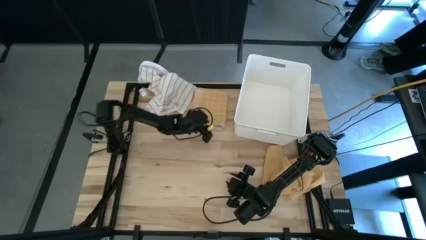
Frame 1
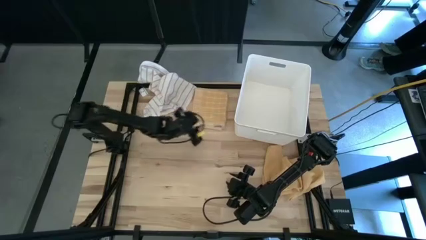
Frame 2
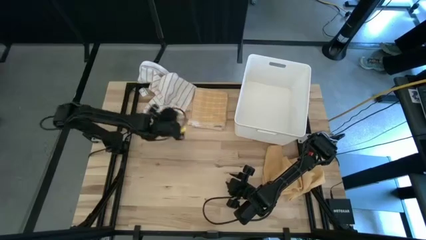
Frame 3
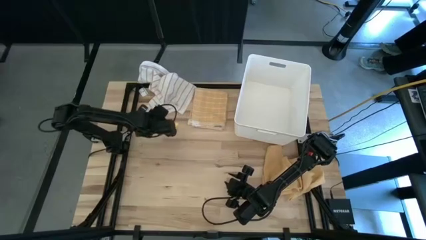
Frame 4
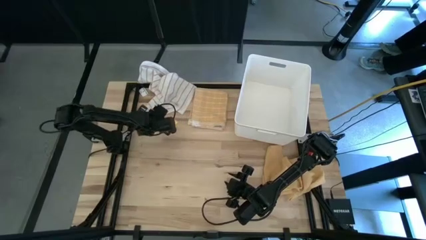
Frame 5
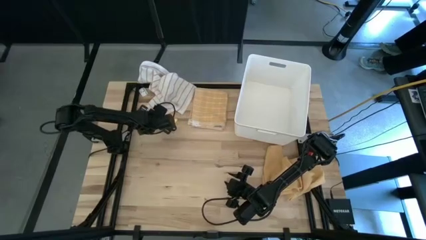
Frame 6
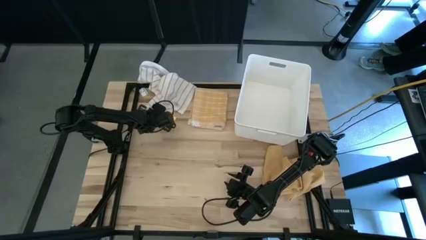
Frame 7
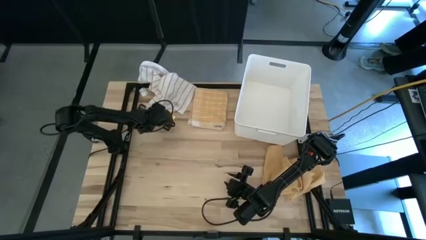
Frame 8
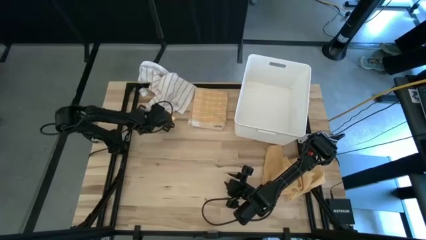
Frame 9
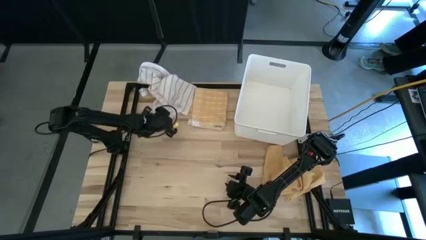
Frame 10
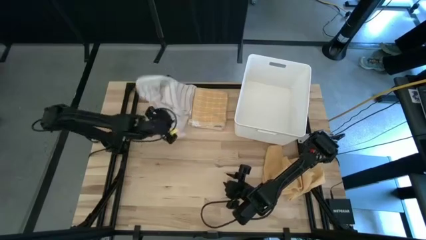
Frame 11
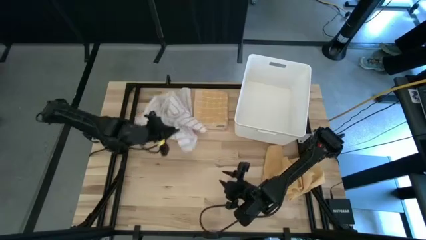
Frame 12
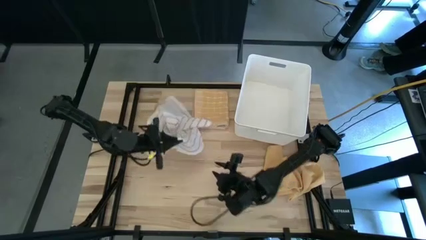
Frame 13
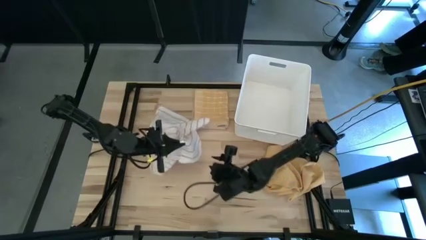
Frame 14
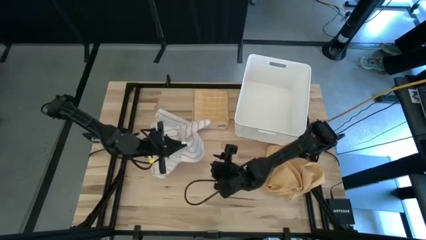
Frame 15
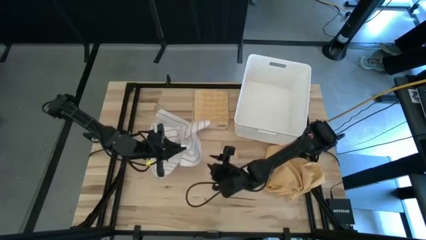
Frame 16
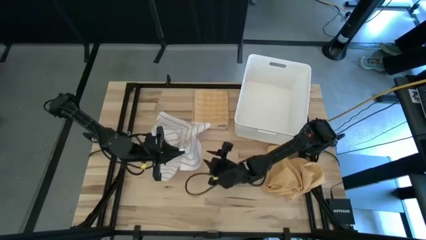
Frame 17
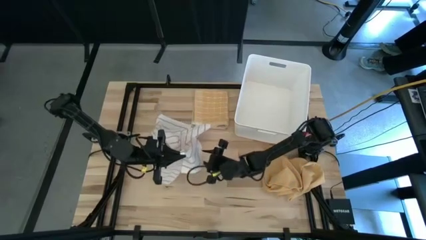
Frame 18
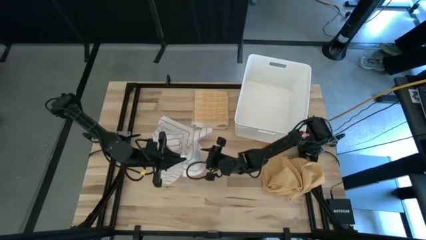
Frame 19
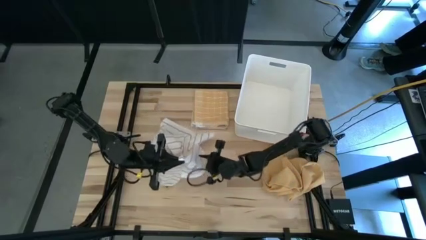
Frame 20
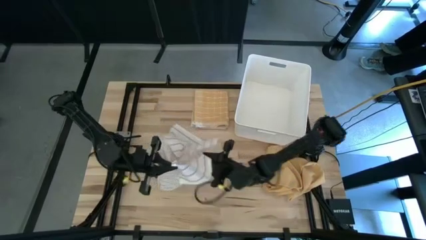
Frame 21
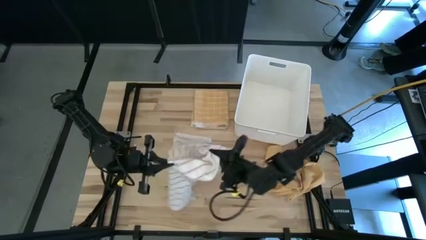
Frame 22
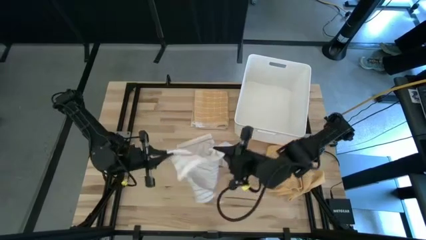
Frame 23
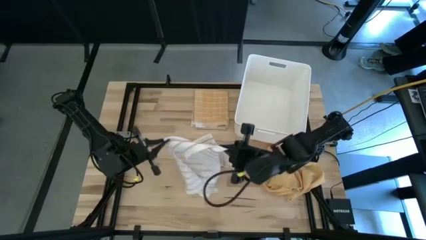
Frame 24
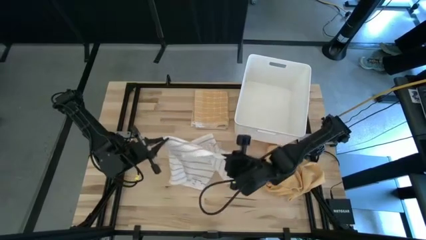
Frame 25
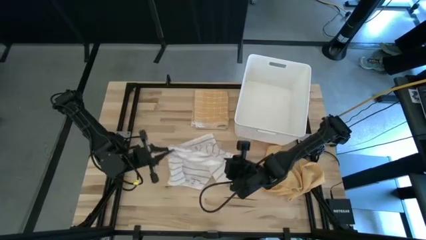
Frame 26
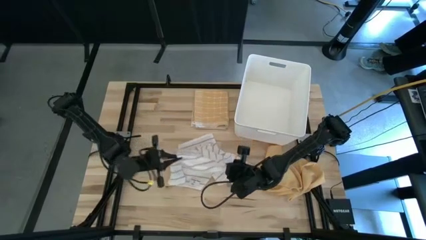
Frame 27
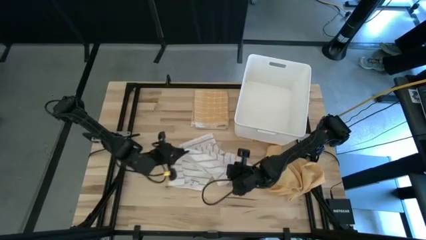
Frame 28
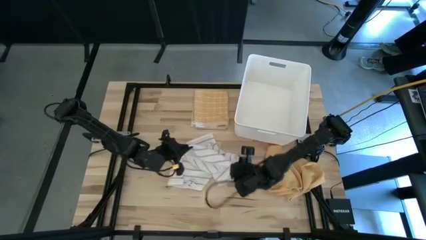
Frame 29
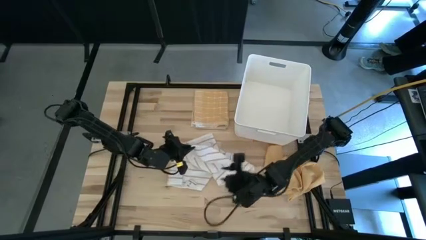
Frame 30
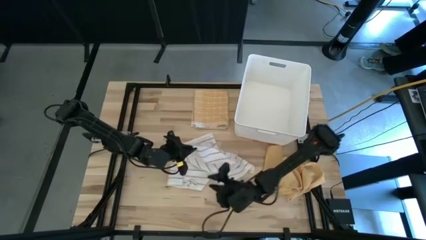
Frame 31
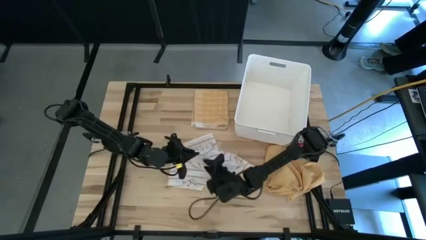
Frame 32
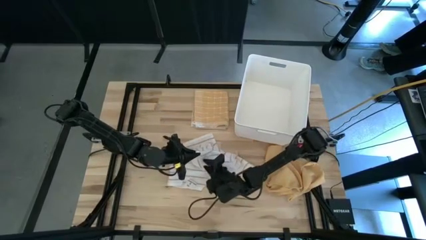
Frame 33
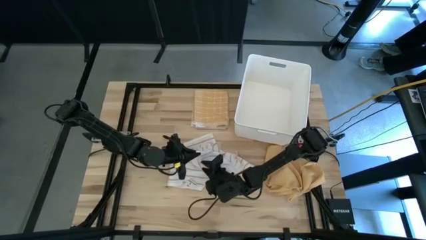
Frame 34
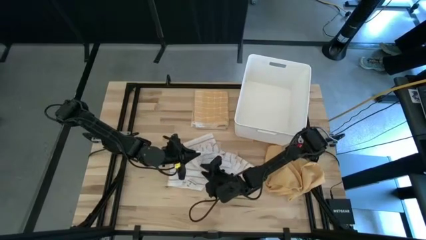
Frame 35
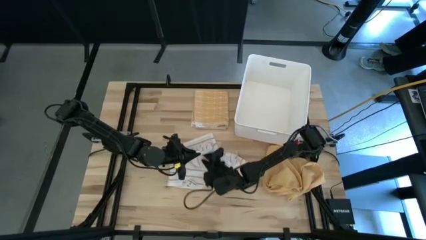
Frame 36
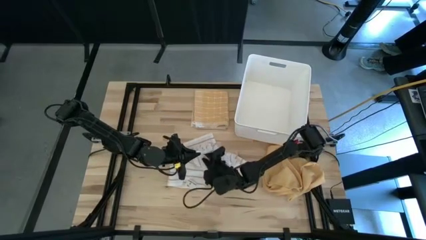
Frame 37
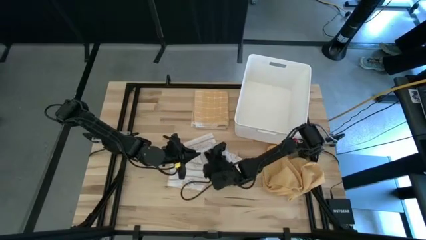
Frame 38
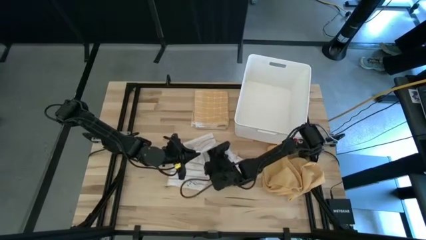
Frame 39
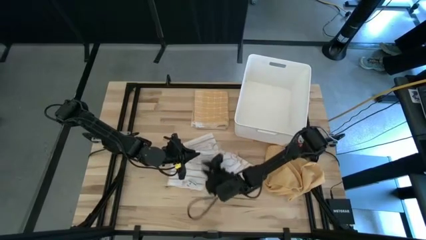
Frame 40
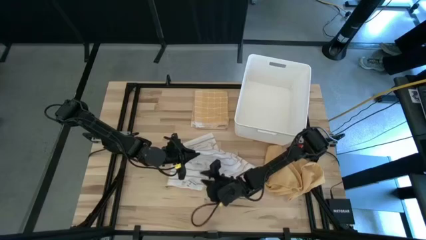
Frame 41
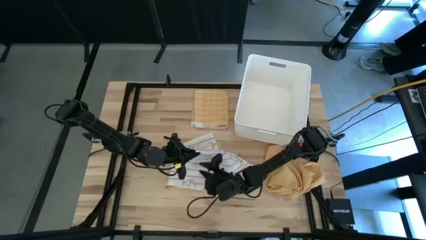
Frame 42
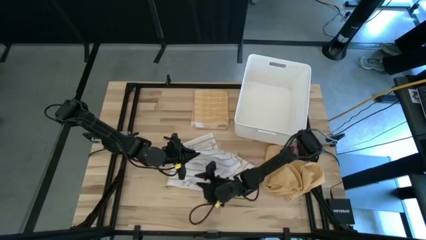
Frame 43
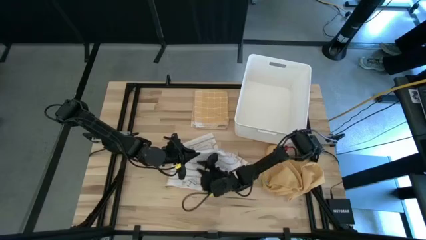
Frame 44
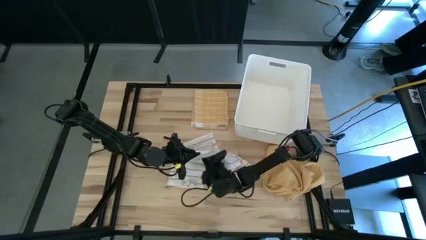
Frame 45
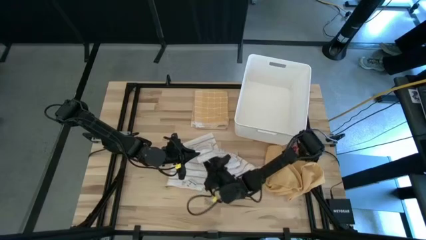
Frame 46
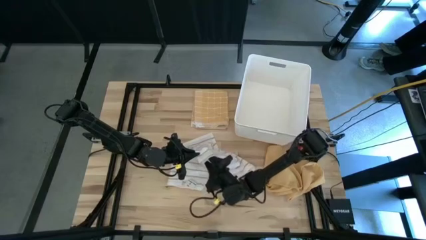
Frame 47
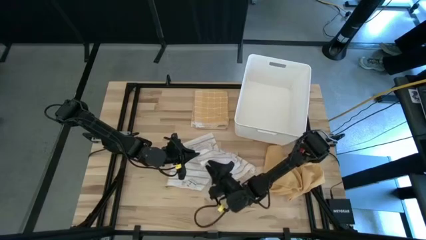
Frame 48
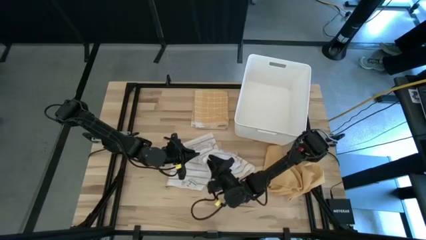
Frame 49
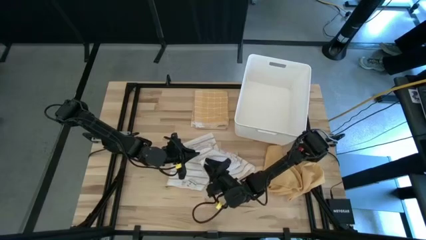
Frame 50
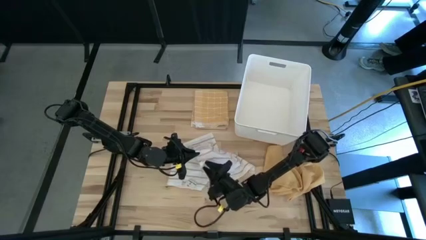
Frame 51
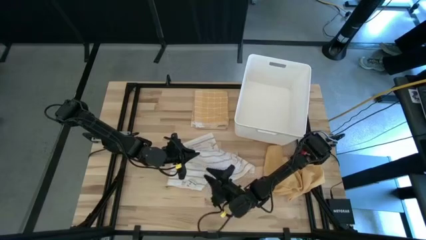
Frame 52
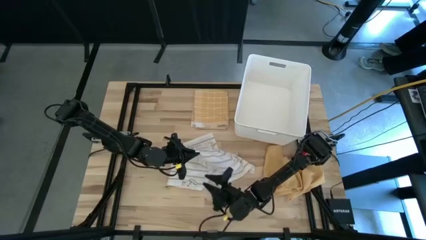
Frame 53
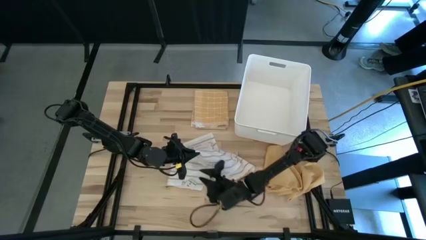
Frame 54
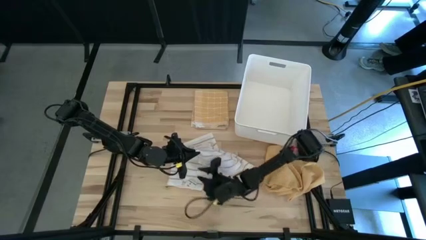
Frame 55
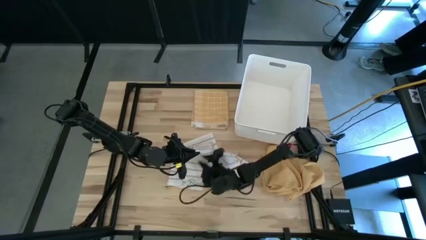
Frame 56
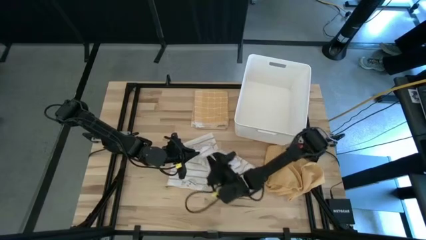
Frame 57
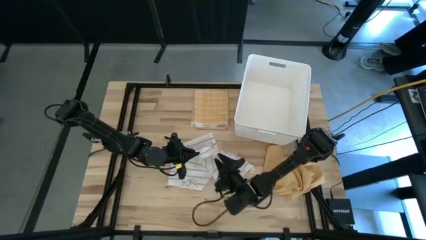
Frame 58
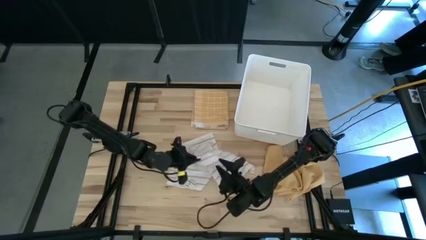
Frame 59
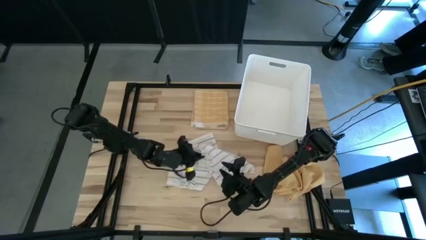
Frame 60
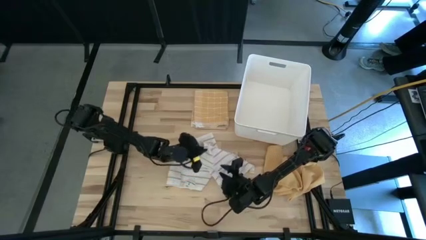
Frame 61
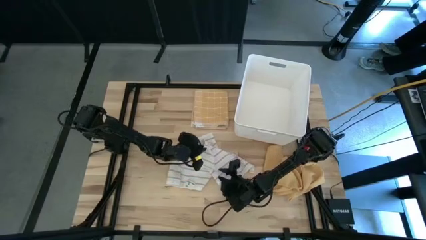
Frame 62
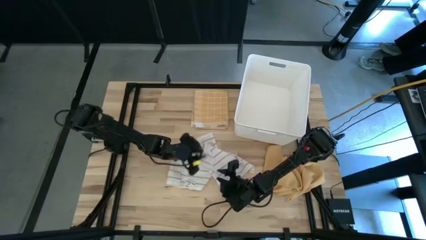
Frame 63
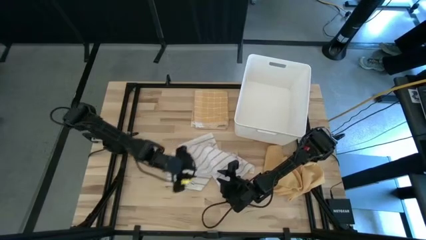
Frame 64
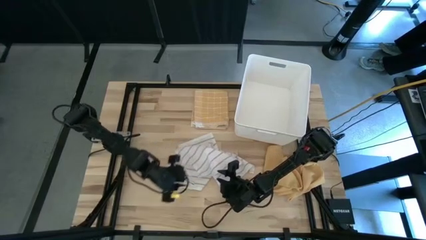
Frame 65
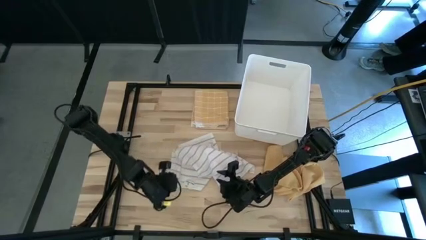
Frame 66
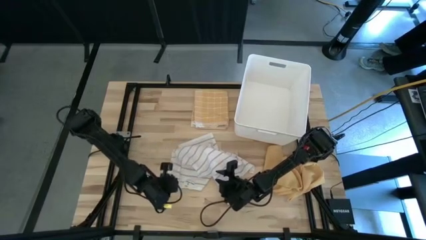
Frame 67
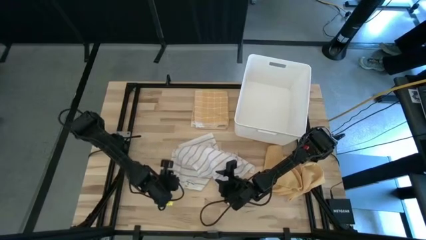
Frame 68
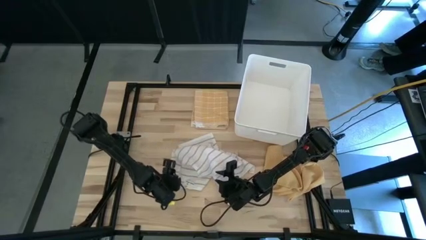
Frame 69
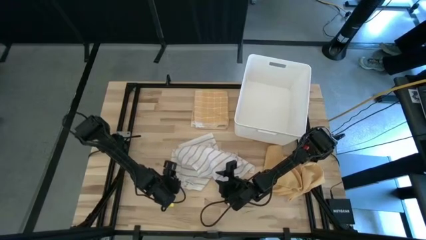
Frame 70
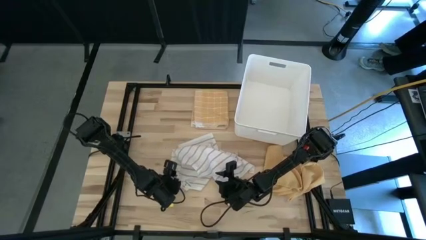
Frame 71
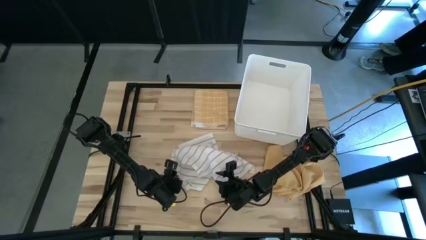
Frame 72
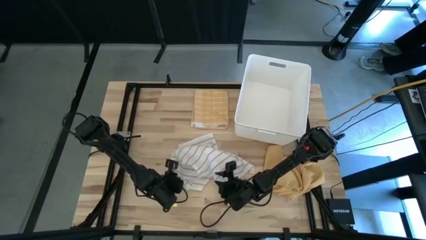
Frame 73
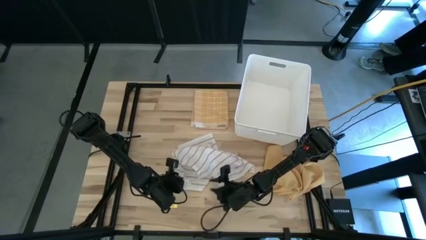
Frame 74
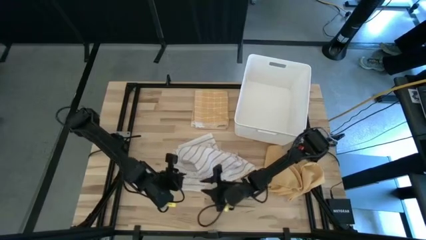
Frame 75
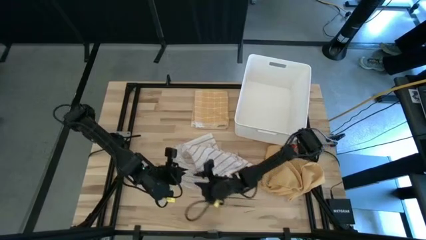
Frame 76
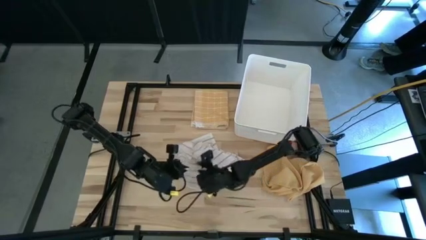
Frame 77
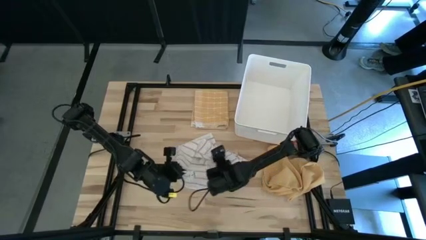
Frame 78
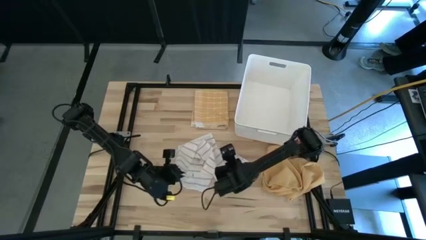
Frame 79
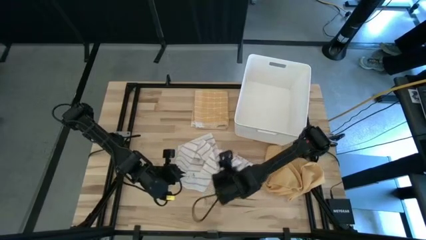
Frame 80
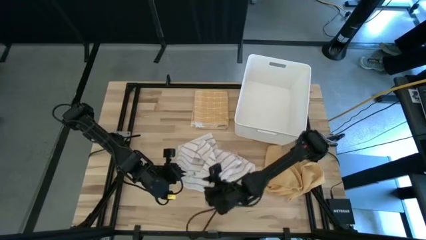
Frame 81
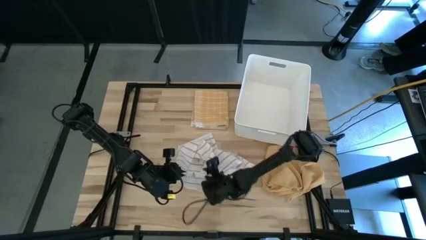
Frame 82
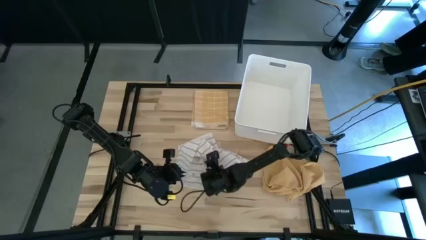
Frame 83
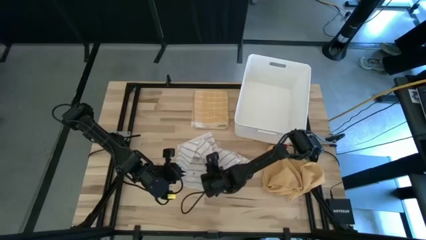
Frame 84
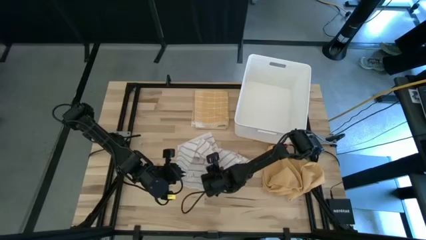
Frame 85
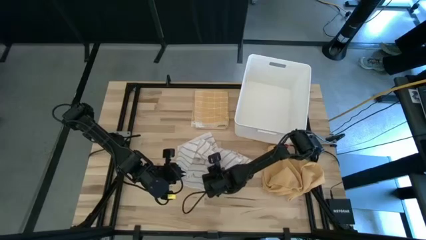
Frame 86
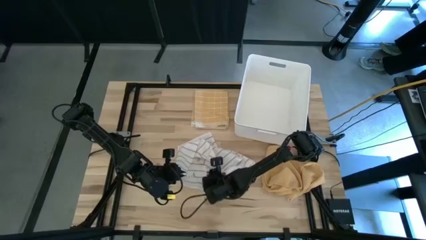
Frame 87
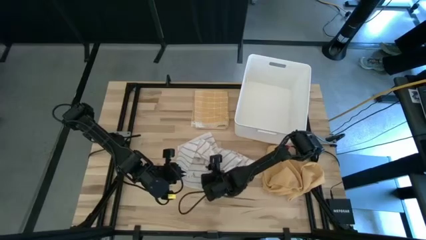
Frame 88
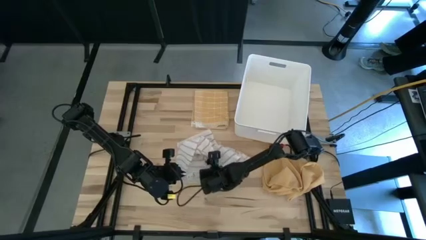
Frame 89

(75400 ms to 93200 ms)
Task: Fold towel
Fold the white towel
